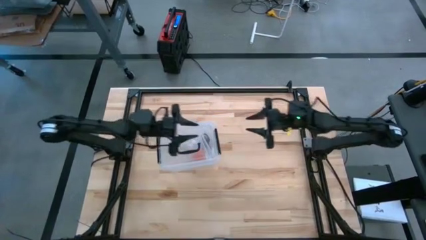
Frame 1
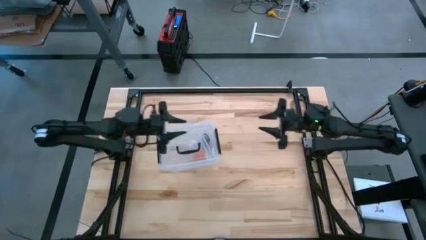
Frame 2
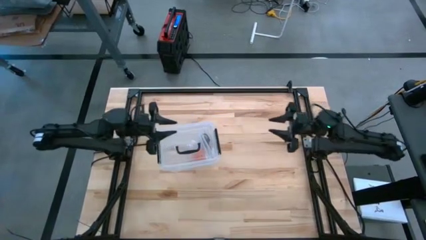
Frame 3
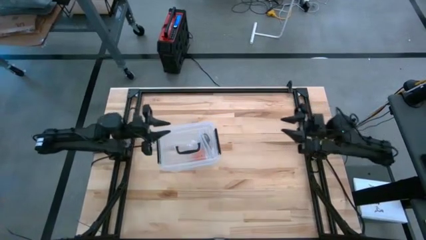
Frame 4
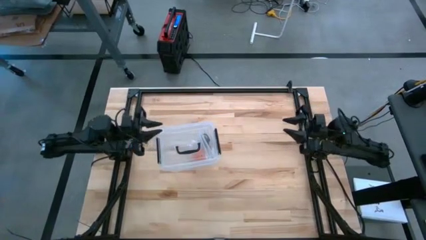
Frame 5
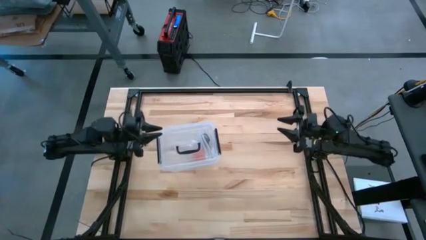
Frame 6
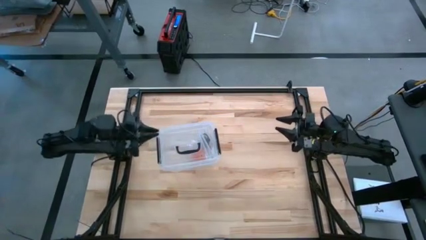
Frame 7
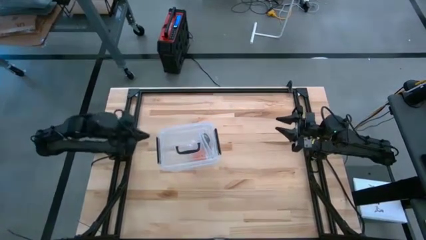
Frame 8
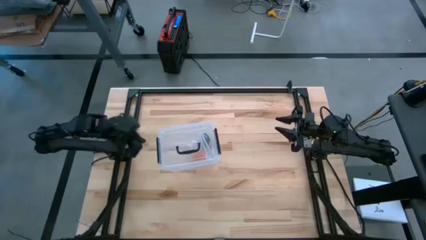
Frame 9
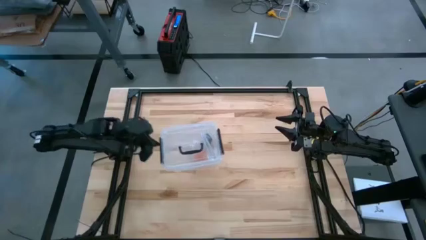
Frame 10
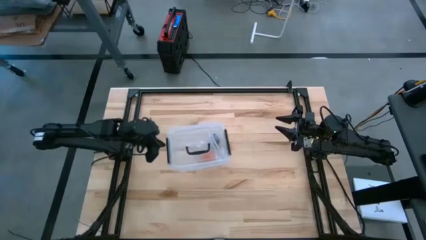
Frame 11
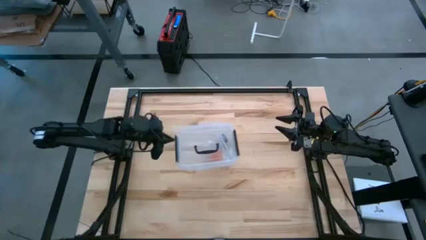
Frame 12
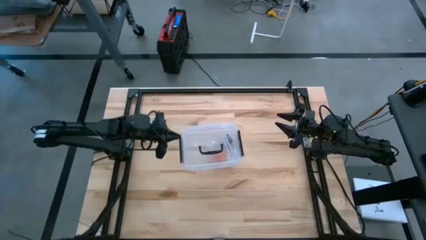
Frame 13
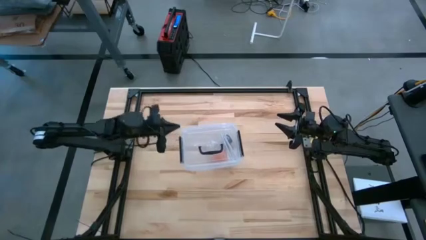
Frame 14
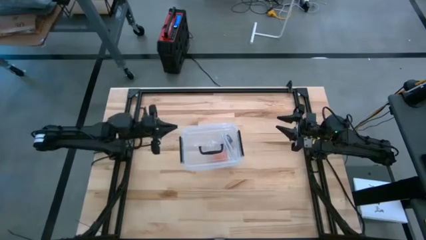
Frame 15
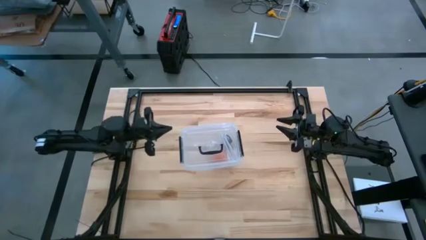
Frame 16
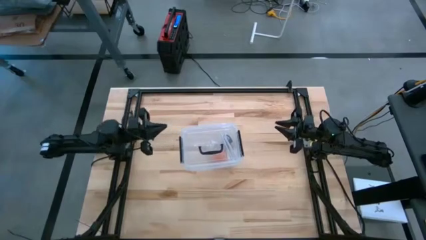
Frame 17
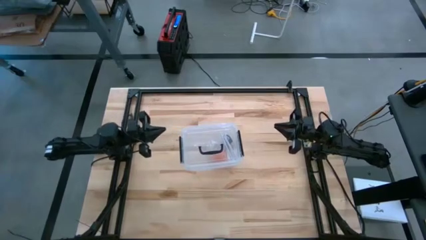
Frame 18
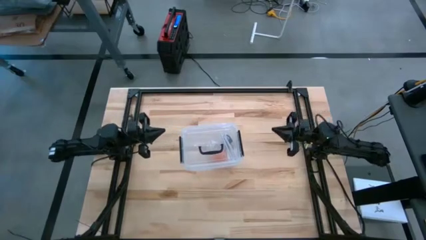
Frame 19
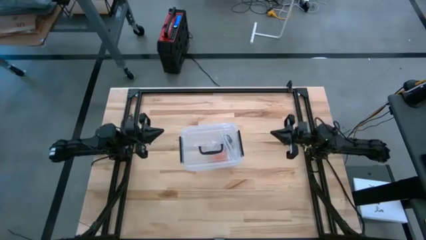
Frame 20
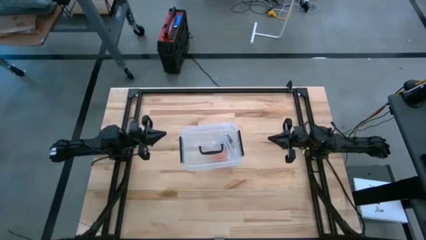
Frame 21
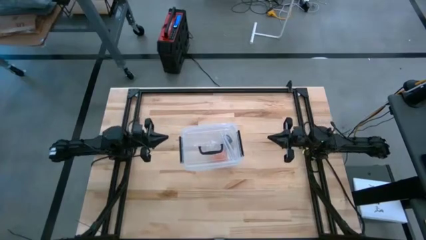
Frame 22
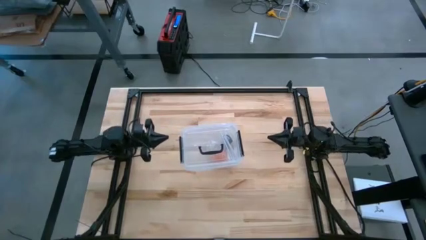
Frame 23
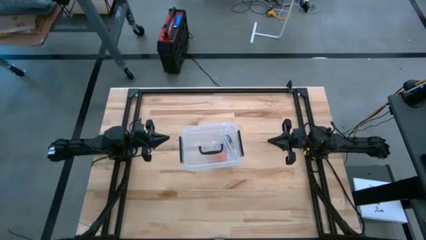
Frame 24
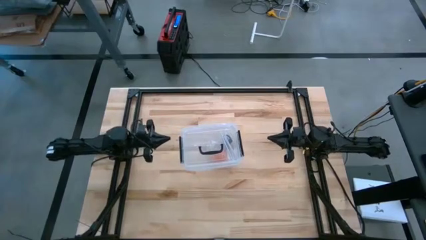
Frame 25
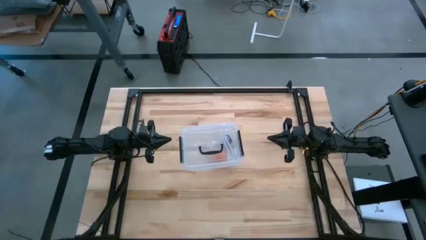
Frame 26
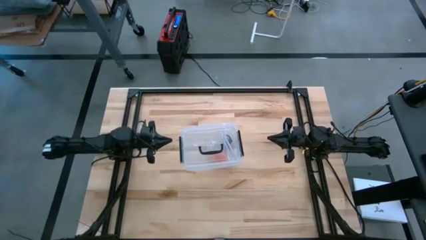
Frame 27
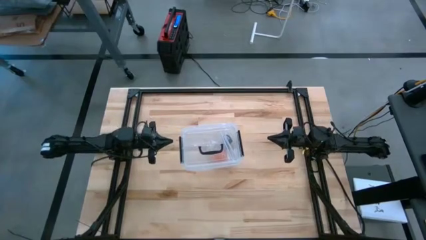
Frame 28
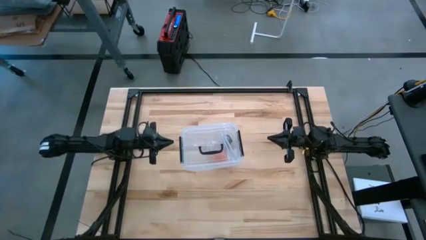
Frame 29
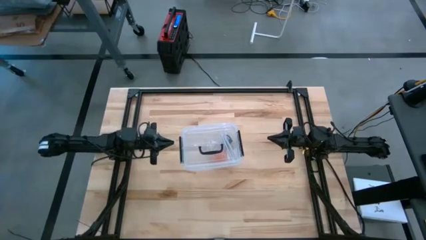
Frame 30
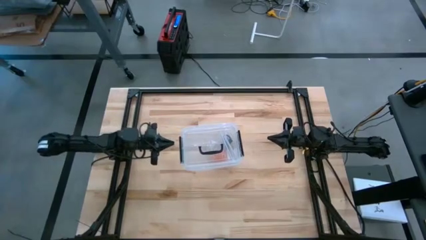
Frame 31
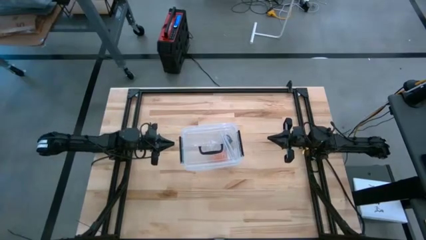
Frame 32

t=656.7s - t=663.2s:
Task: Roll bandage
Return to Home Position

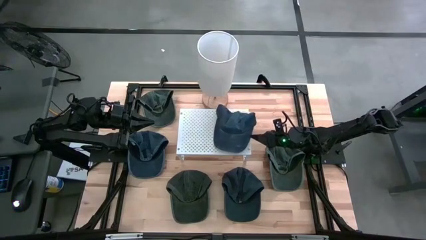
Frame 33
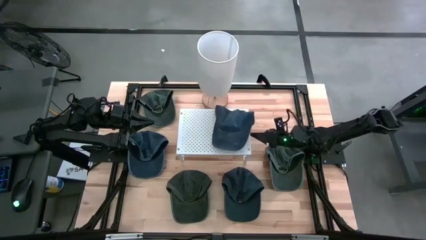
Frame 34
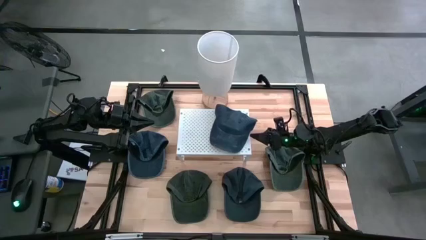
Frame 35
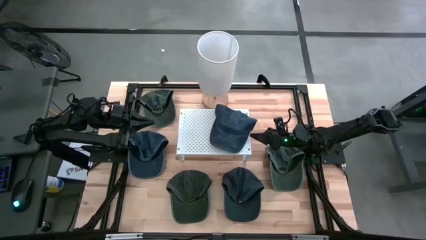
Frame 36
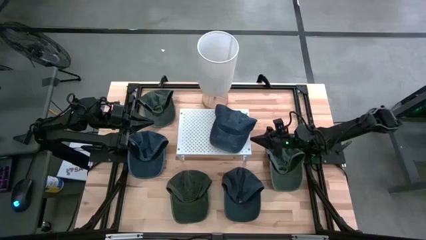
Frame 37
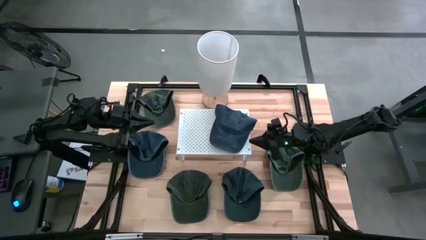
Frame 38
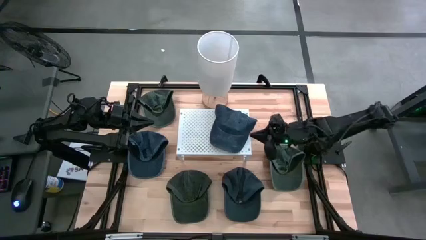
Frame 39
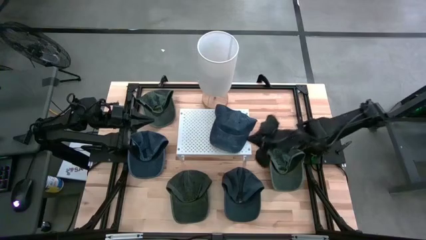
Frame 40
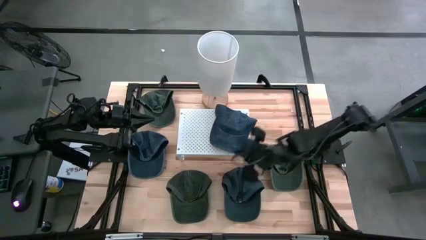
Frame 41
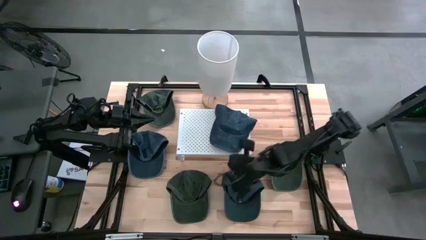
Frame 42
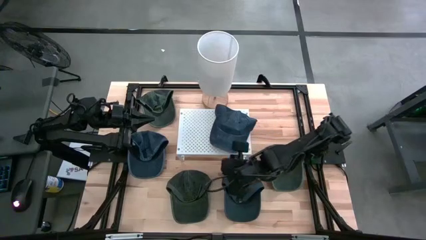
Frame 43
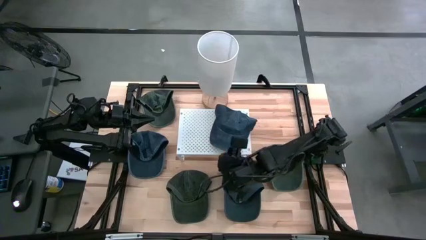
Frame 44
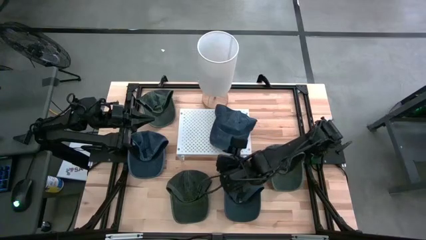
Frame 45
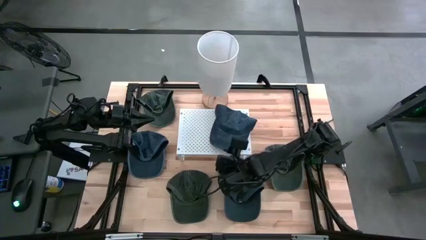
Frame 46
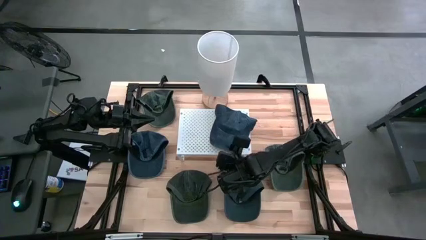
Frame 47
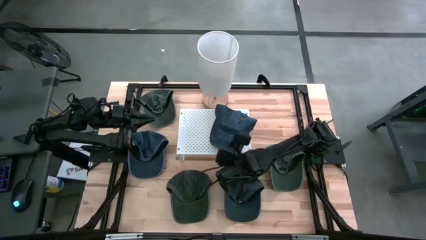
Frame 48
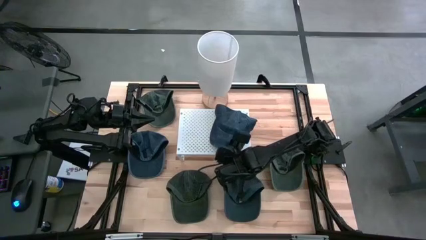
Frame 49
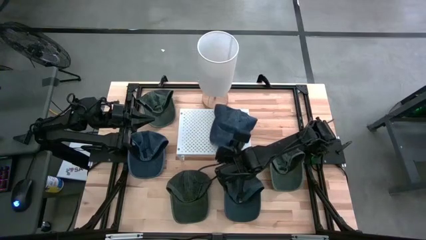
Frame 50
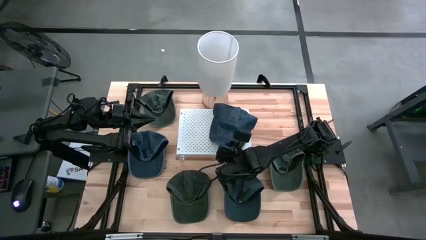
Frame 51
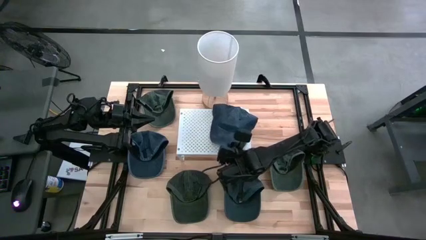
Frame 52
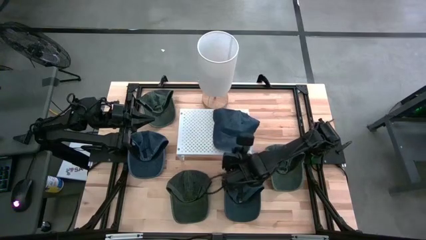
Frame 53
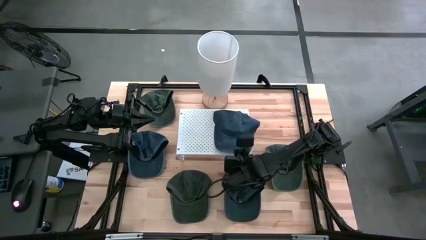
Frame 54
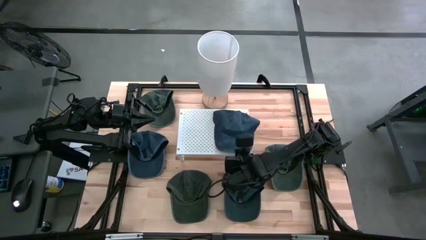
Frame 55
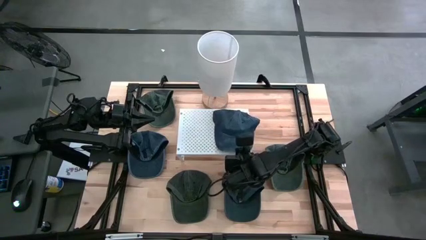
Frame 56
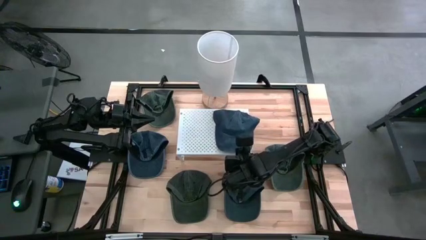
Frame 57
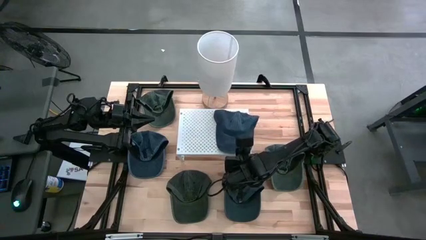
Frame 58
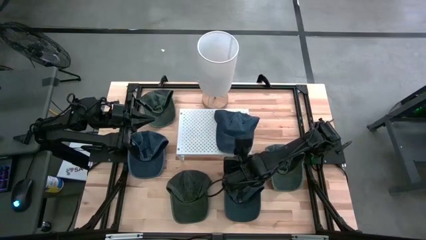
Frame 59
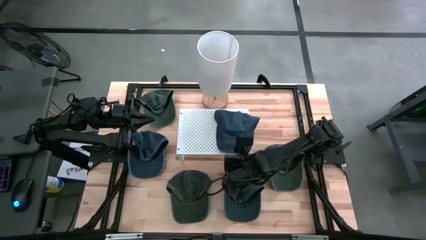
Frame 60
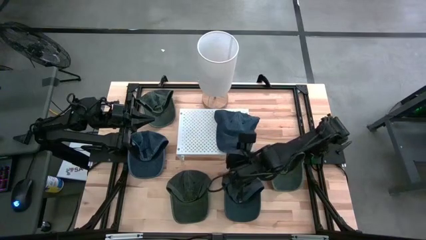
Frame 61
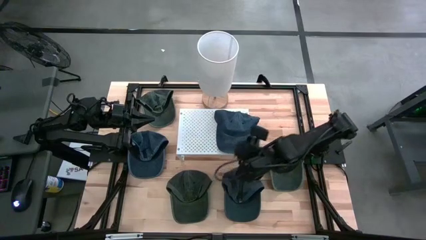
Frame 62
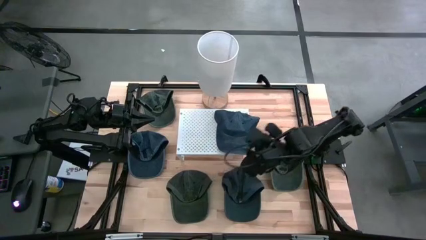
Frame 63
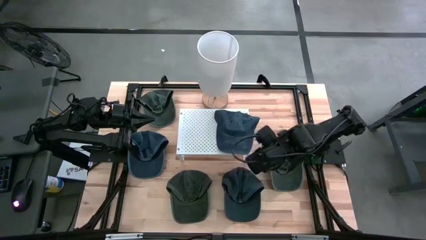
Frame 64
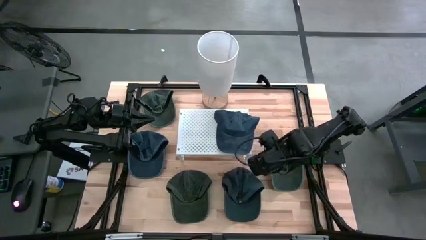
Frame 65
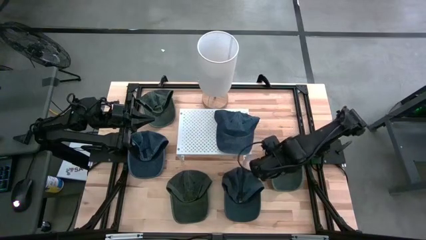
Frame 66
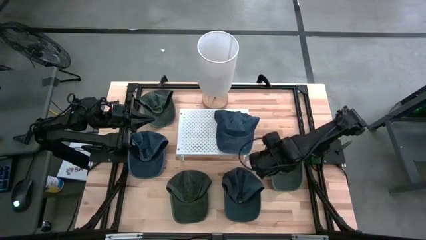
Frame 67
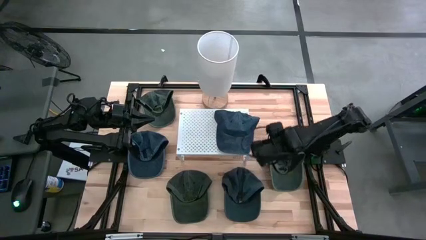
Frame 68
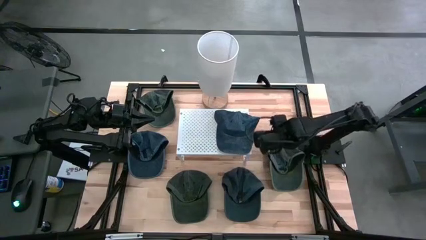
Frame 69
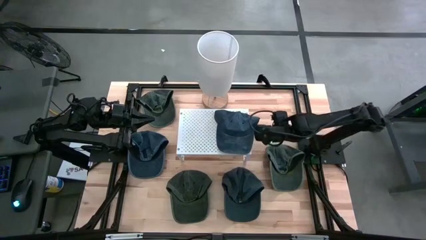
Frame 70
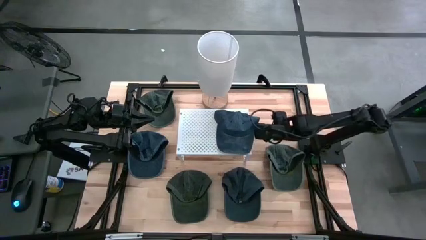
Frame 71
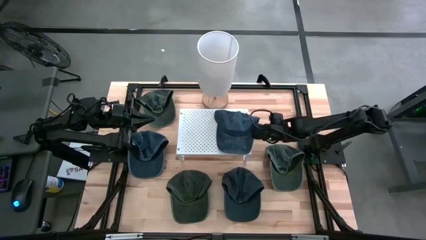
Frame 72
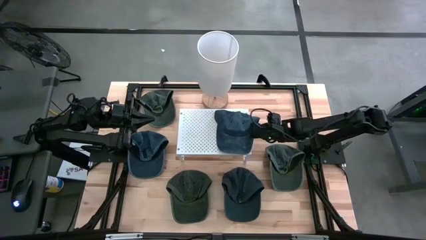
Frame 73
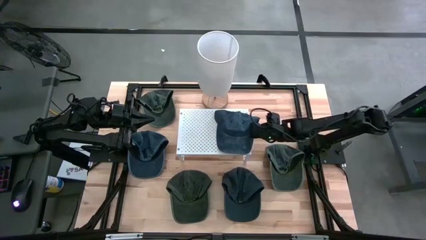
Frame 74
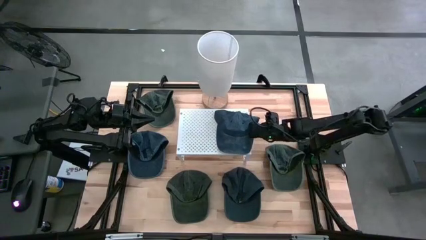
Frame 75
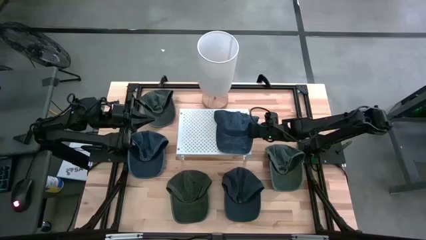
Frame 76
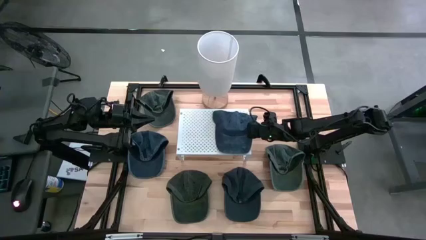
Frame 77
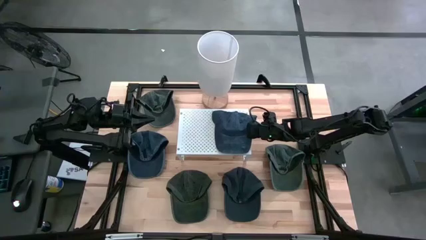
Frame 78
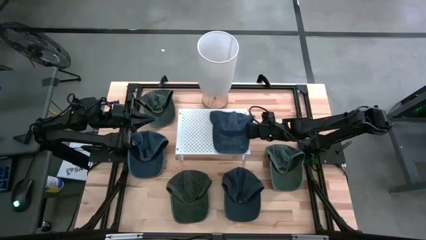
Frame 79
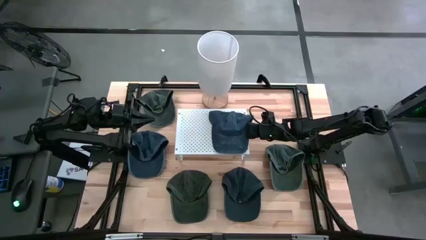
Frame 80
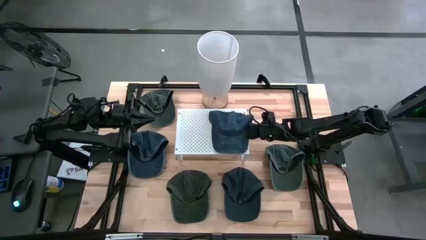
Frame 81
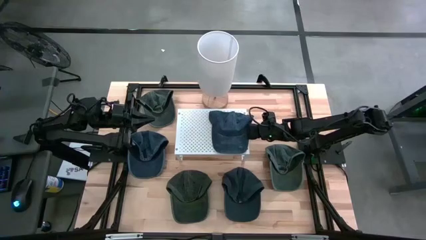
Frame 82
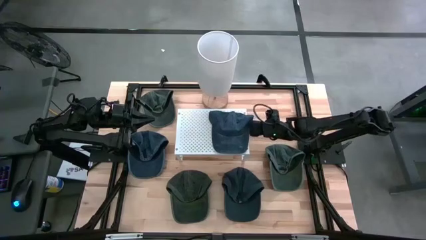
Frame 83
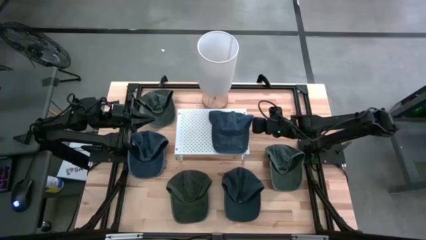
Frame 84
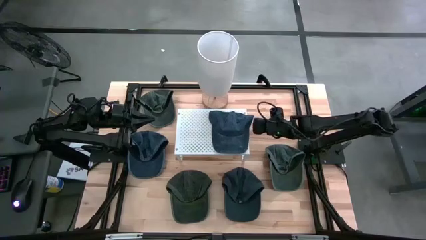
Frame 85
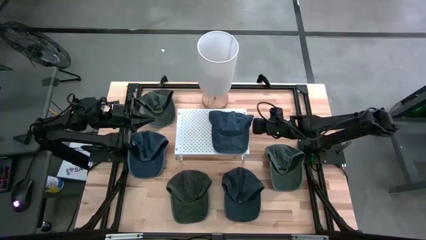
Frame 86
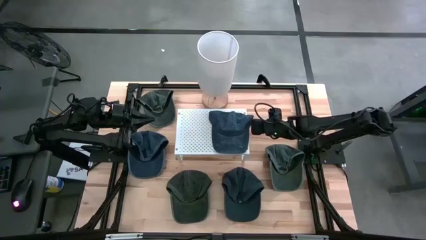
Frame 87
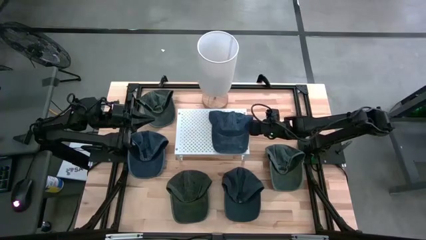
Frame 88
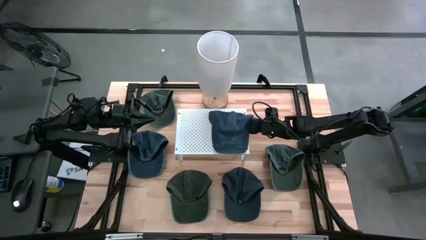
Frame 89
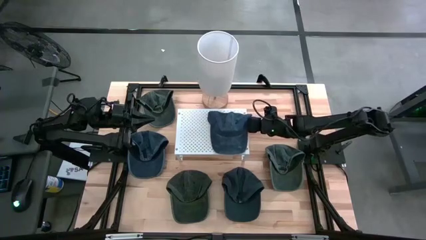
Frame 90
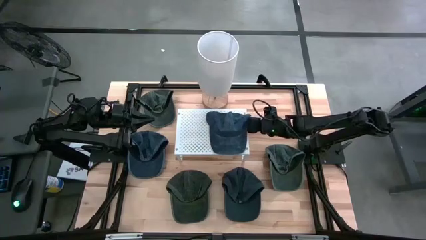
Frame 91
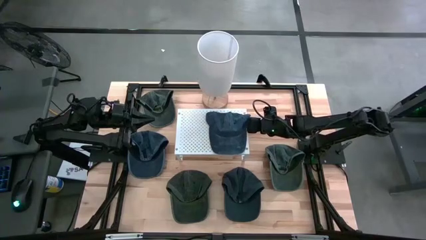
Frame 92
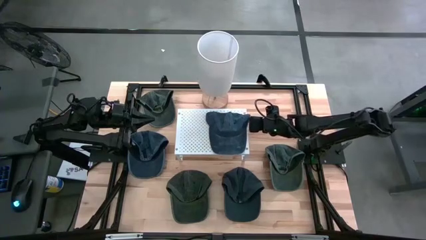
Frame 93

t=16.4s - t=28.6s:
Task: Pick & Place hat
Put the top right blue cap on the shelf
